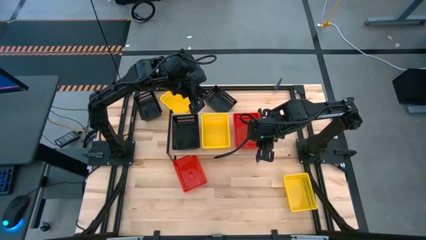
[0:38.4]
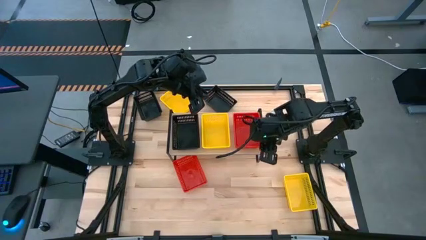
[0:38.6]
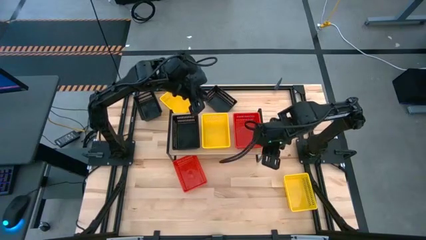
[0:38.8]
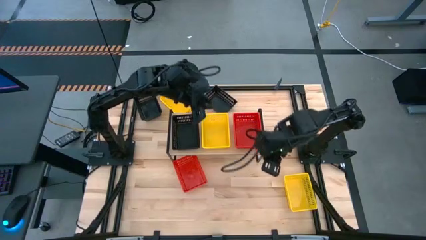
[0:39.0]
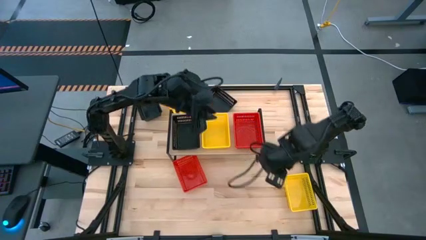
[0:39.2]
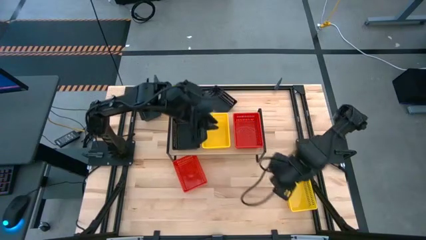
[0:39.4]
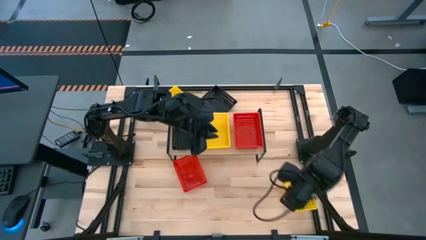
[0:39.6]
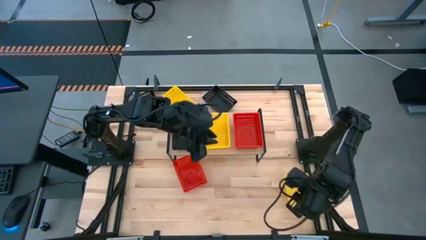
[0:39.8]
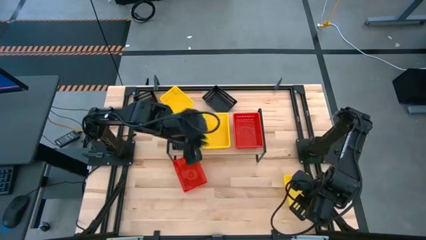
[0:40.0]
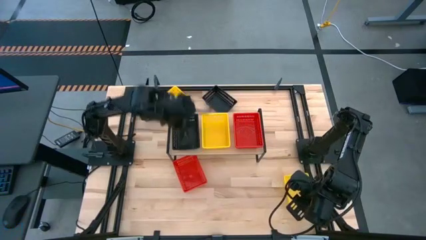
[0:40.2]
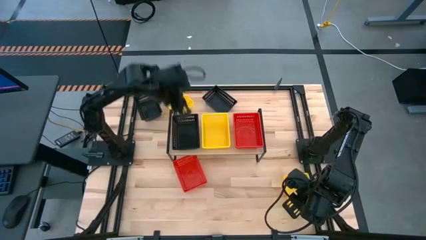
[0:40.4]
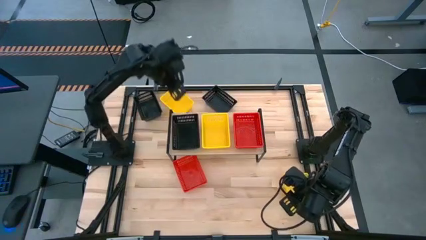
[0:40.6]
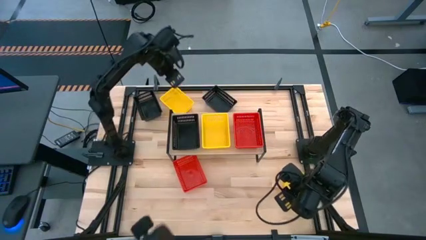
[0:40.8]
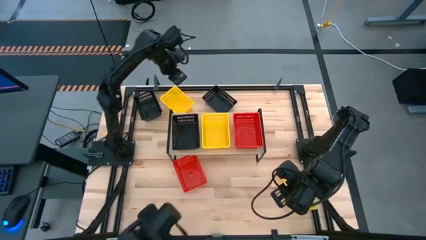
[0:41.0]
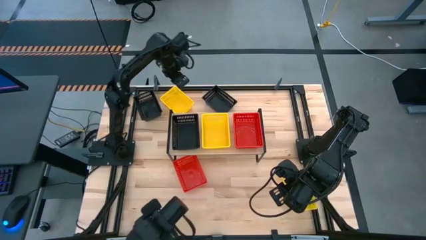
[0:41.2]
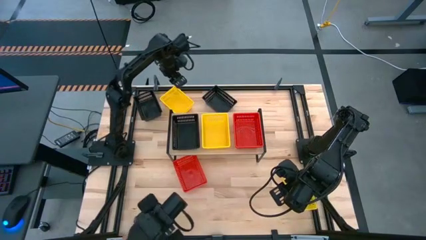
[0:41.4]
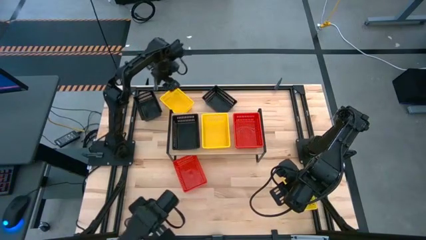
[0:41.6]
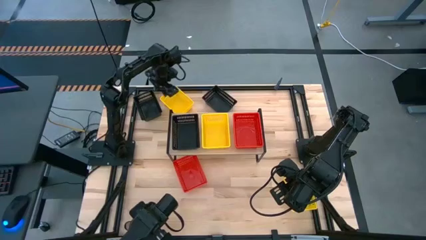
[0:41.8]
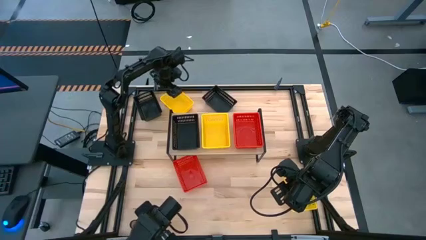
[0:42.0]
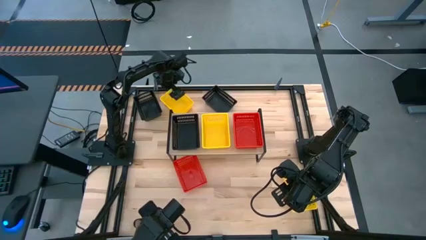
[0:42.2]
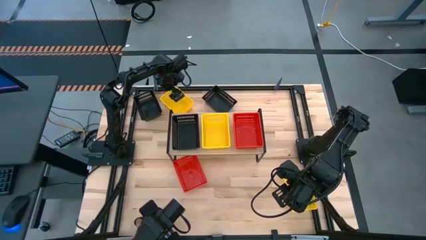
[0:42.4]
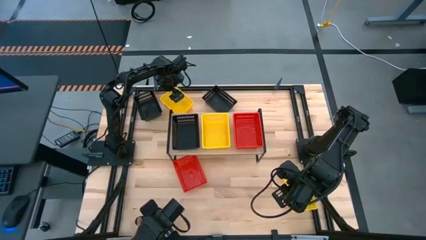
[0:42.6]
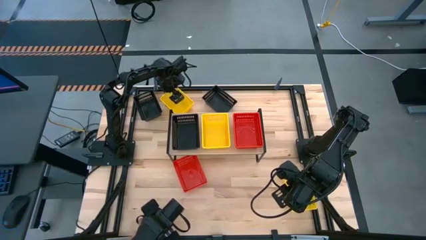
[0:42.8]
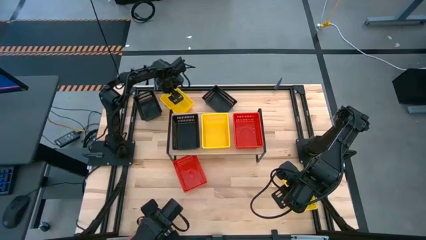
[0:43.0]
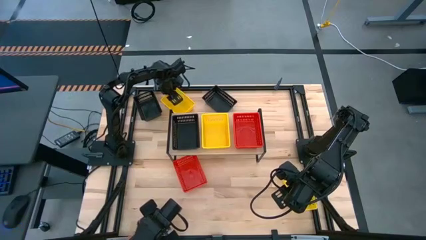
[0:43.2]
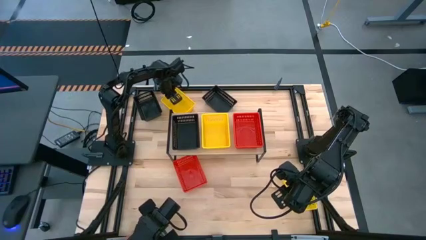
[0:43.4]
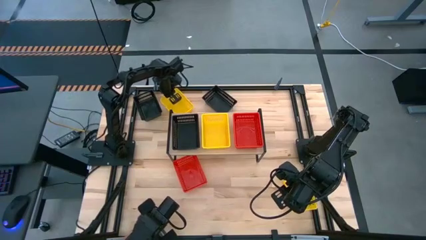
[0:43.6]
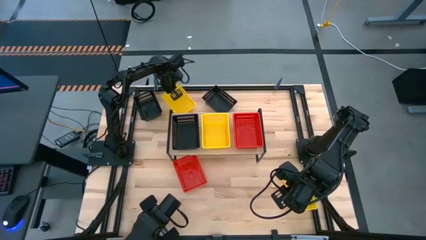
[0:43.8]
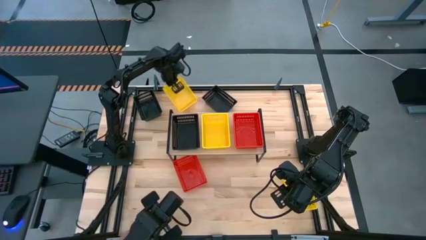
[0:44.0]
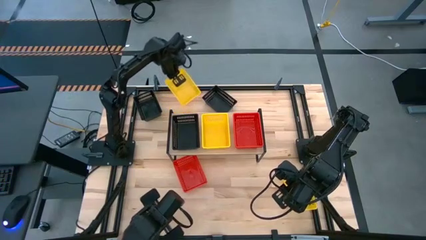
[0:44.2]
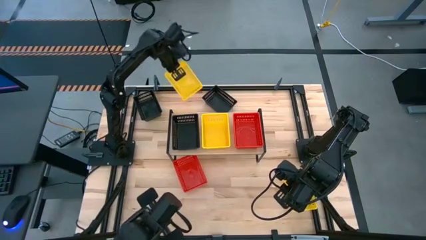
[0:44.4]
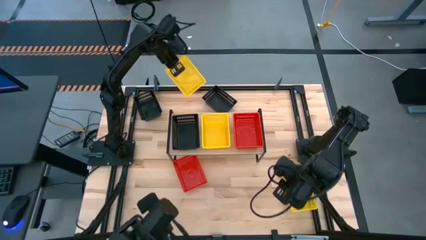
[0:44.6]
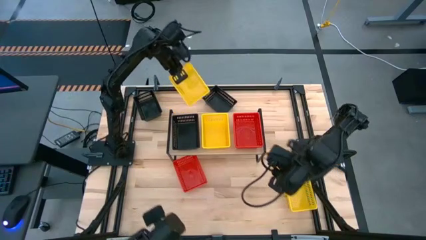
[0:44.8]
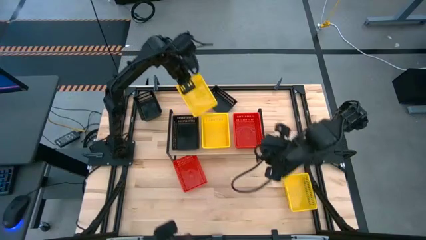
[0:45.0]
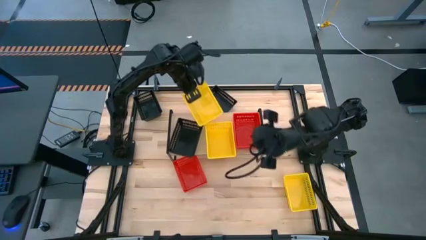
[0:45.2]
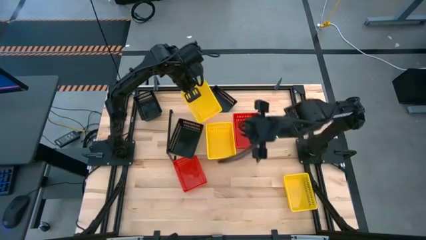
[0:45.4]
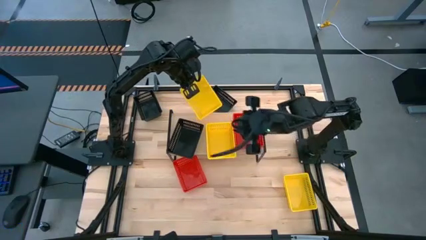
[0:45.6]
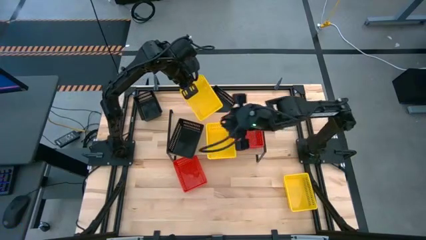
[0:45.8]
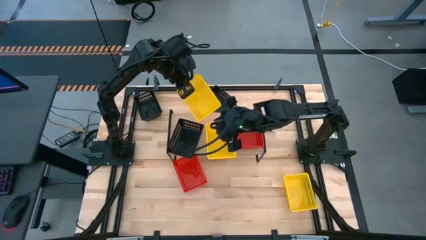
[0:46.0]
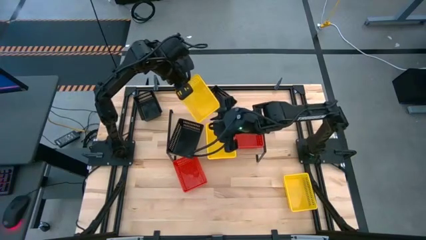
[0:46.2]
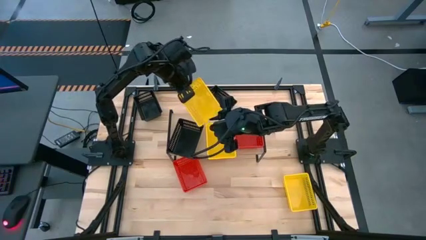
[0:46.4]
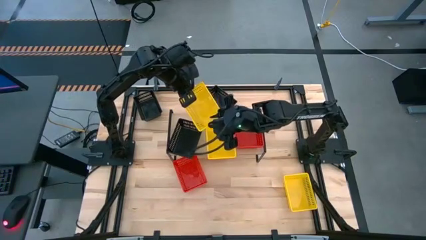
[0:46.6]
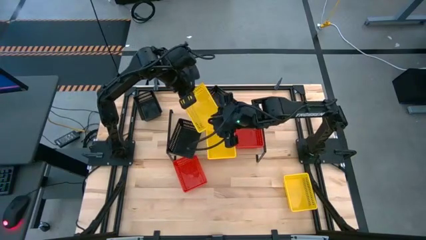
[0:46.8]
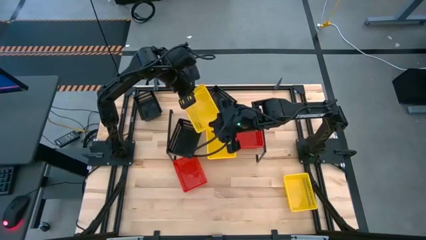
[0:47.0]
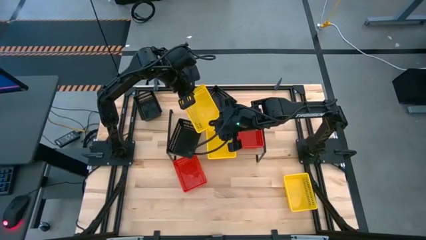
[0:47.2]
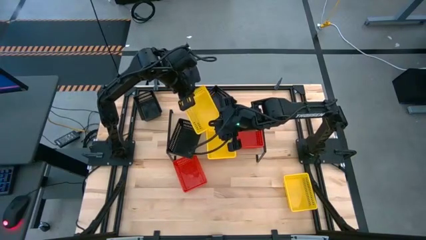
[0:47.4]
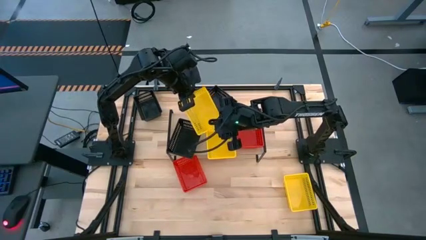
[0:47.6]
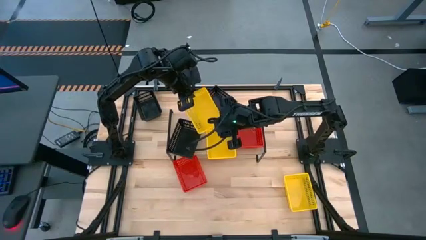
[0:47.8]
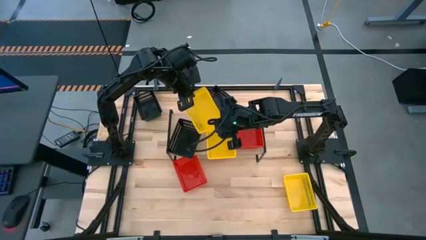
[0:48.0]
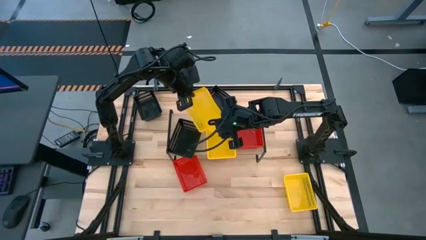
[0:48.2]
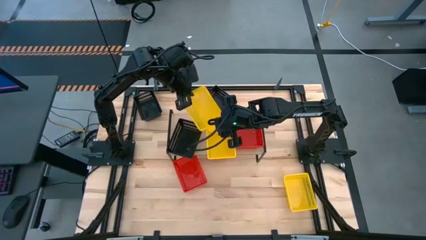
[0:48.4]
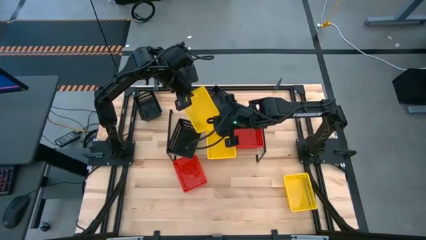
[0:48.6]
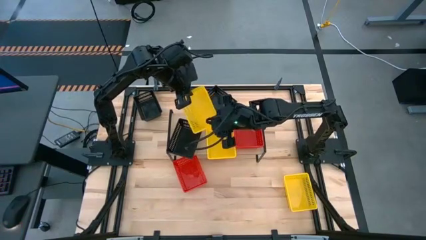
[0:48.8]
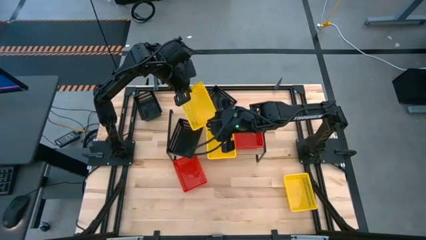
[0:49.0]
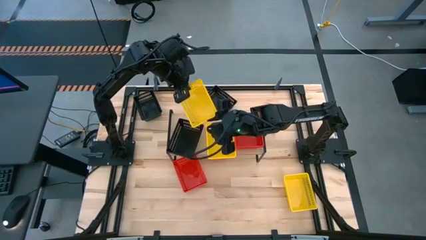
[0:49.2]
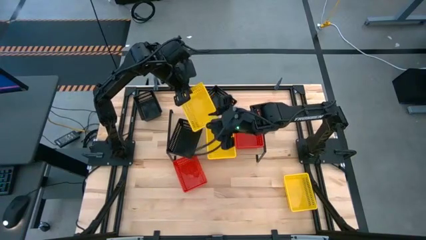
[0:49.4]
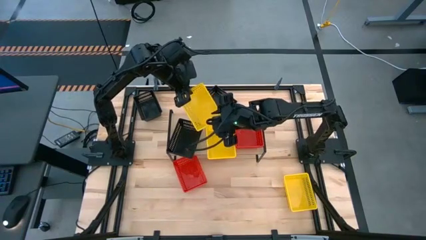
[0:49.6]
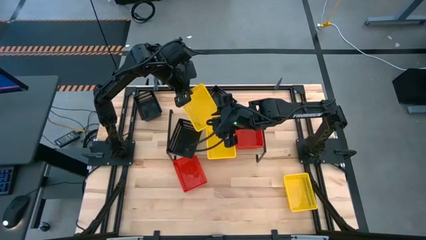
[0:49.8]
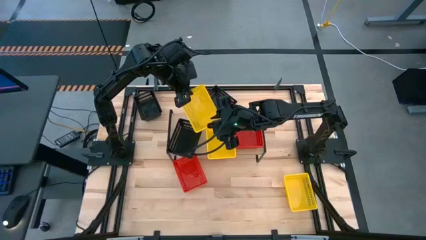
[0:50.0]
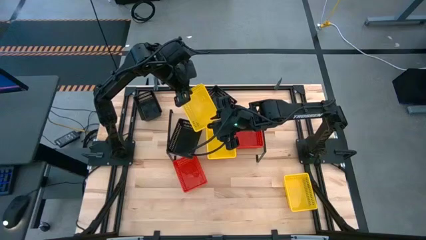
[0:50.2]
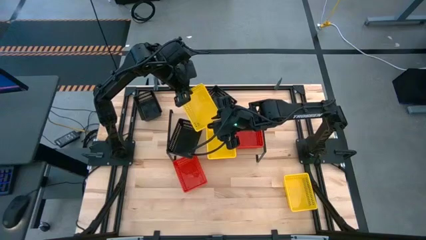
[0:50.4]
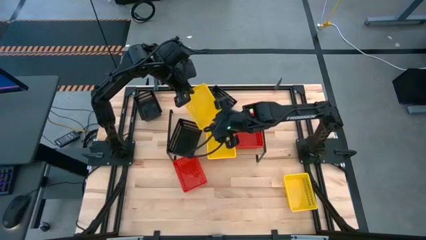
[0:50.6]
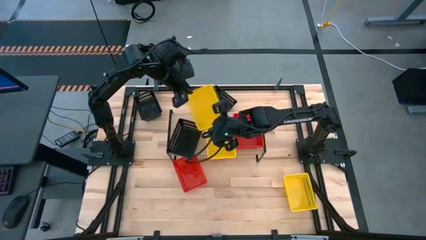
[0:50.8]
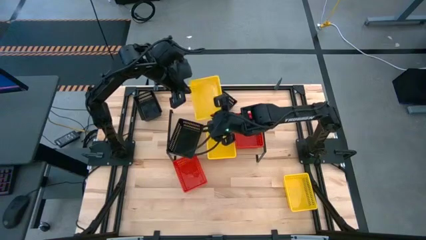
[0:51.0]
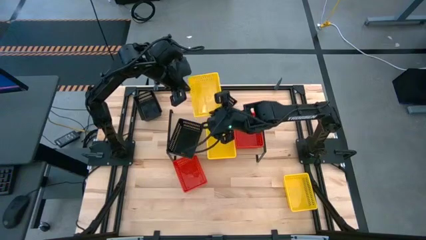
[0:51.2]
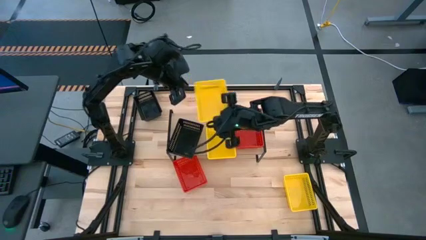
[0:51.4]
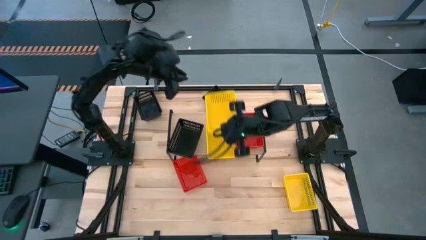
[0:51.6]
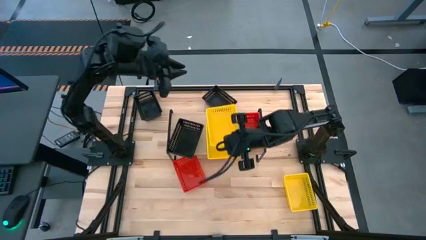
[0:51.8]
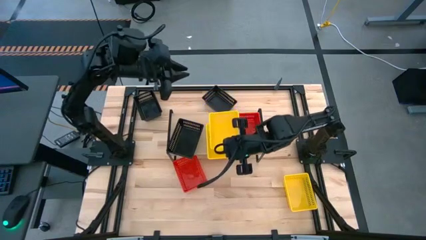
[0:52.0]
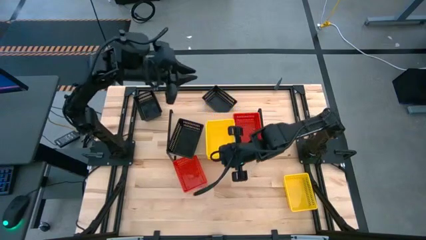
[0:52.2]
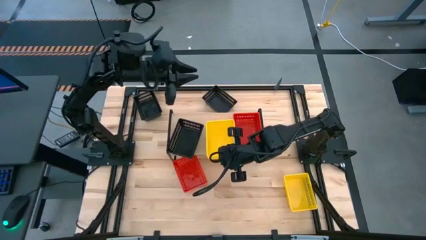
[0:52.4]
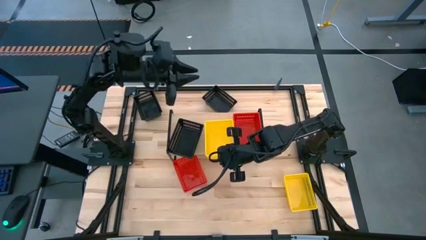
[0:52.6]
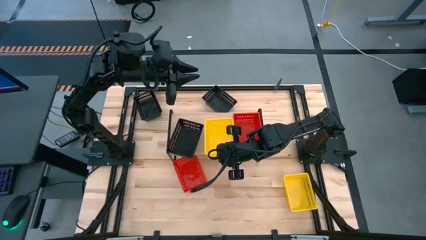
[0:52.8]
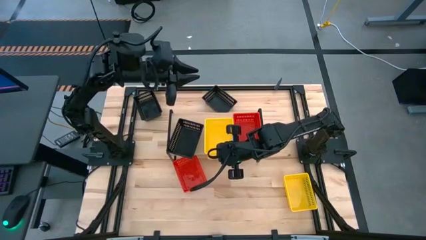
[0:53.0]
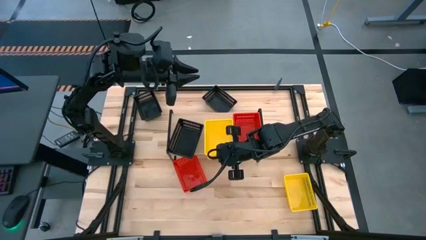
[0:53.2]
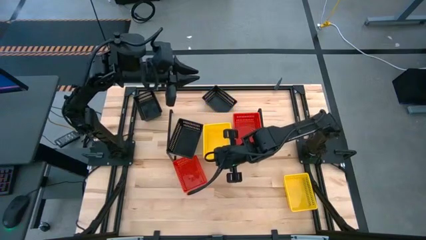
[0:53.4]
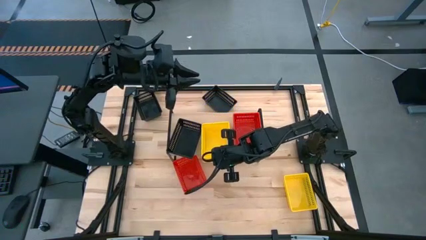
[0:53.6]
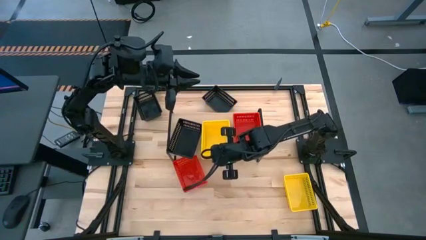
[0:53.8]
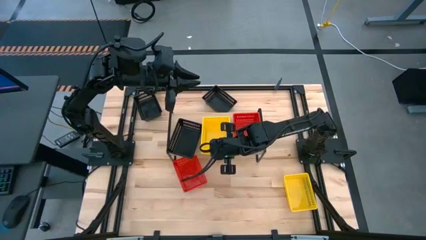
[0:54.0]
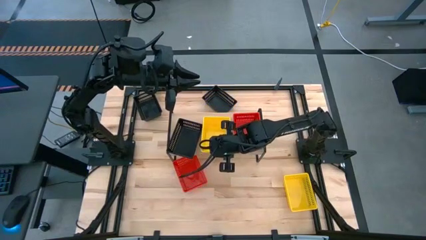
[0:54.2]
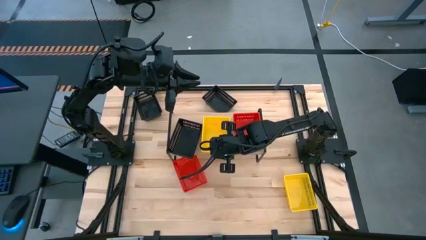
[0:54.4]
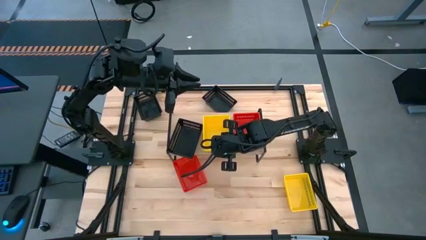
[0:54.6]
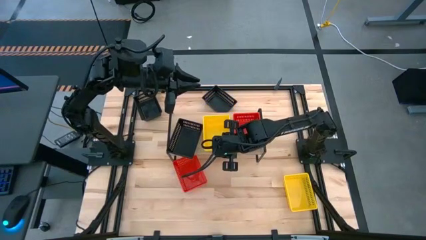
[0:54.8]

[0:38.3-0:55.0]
Task: Stack baskets on shelf by color
Stack the top yellow basket on the yellow basket on the shelf
